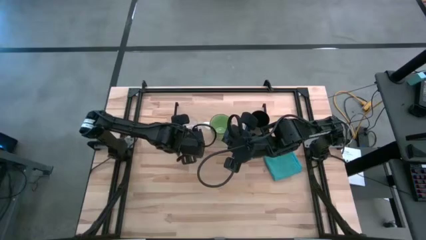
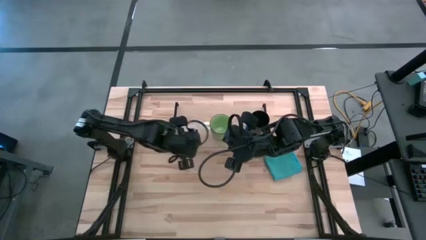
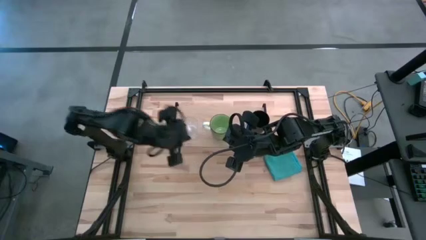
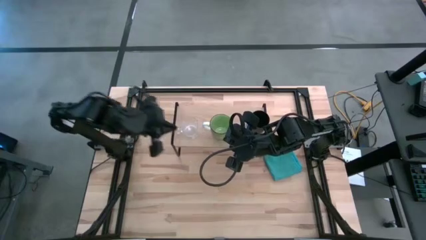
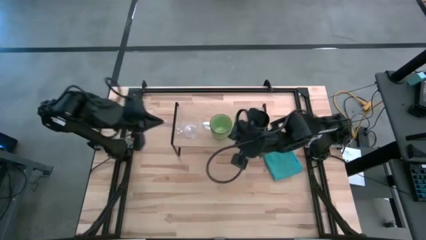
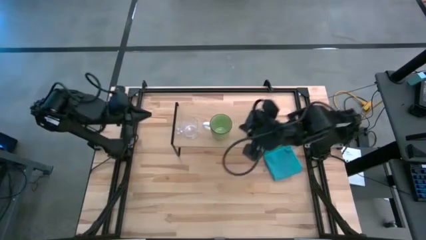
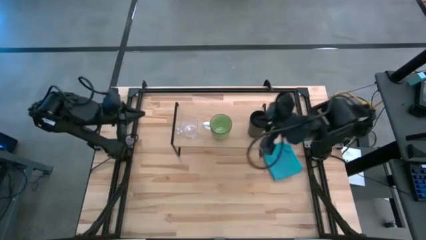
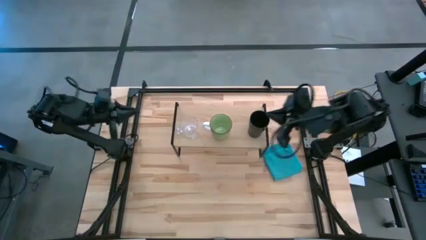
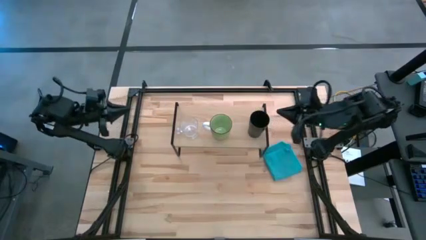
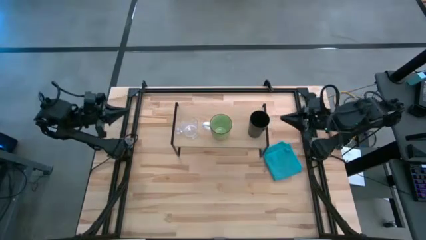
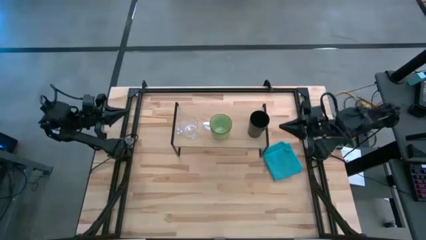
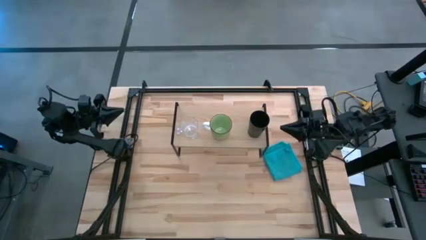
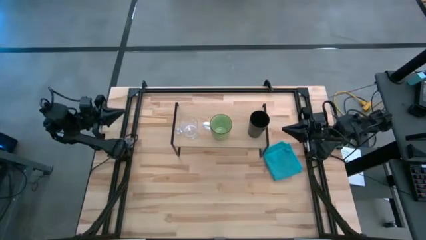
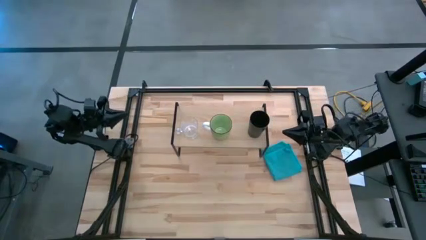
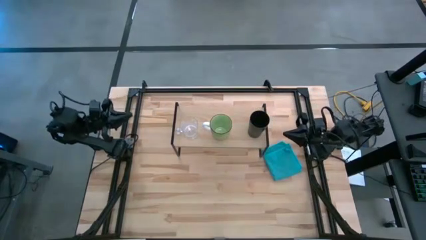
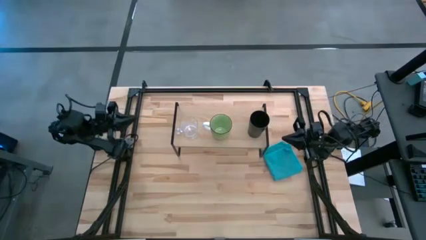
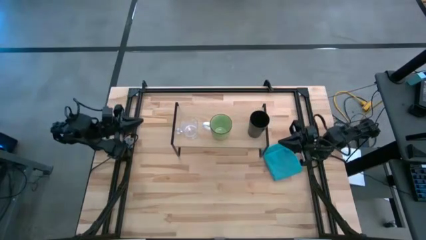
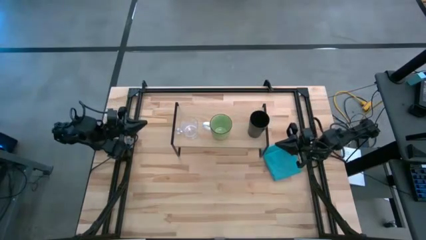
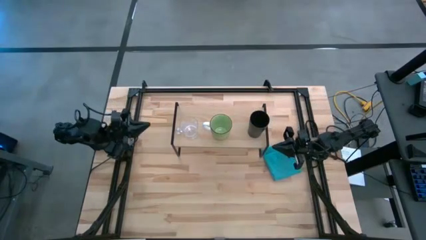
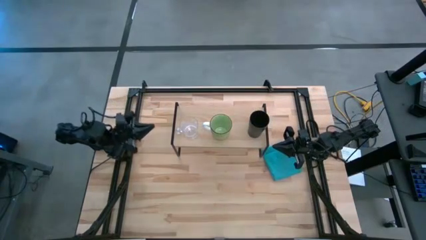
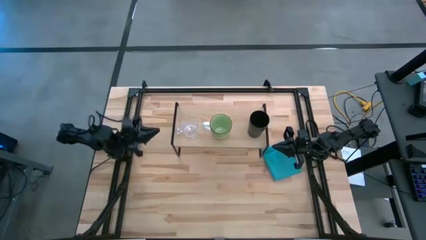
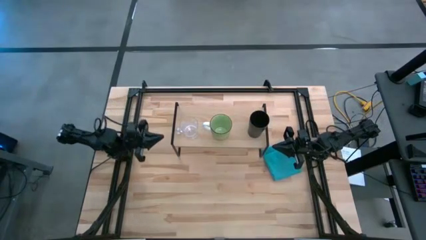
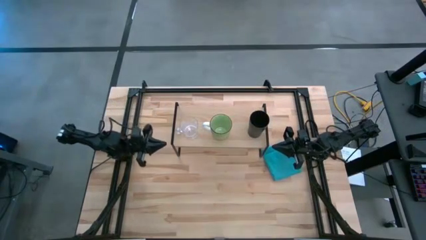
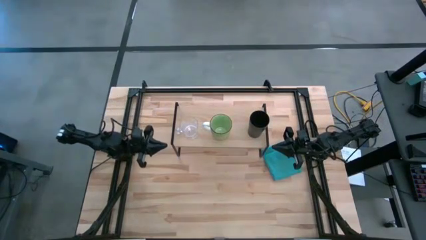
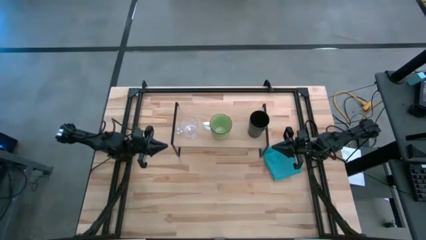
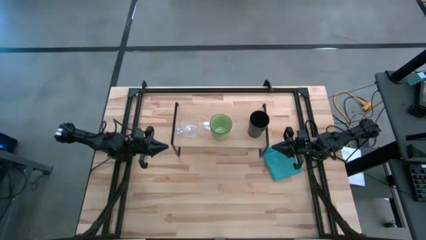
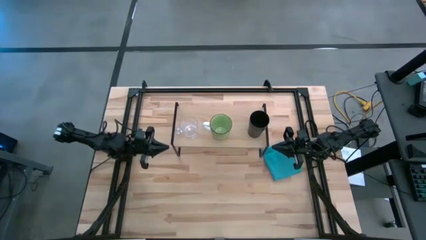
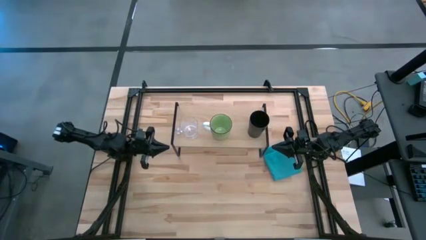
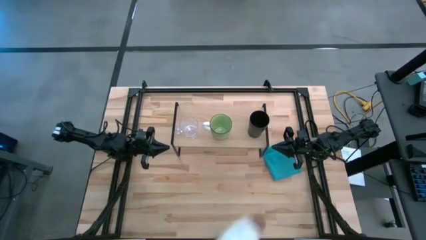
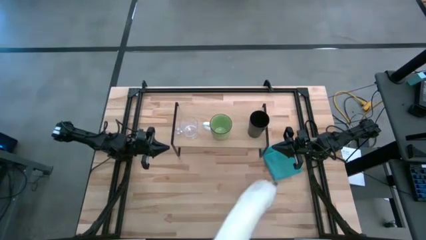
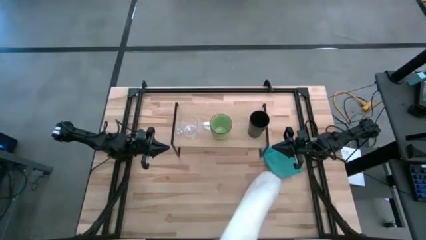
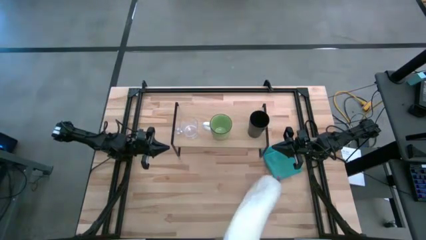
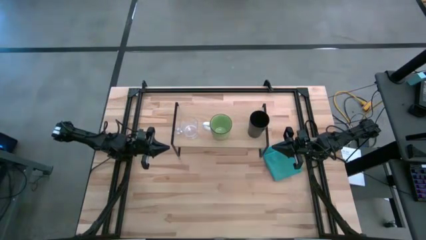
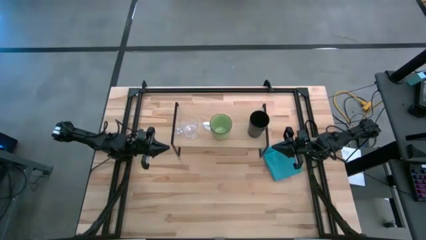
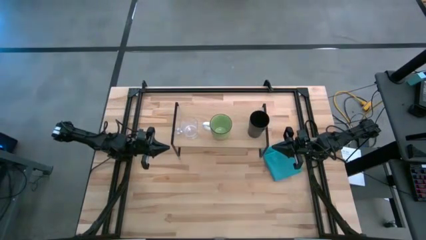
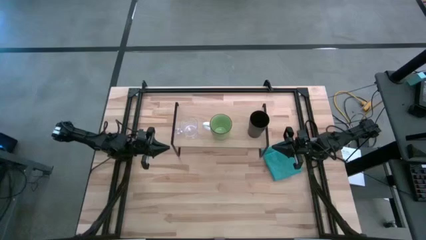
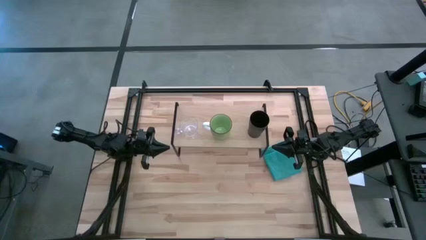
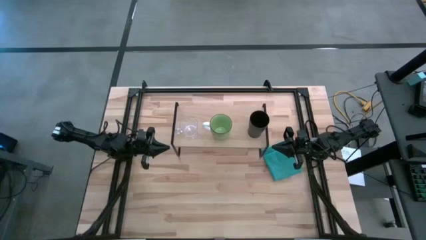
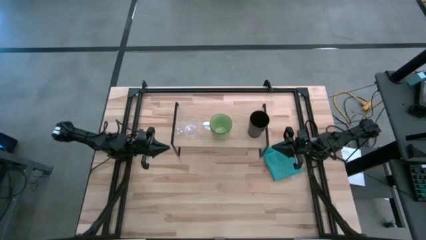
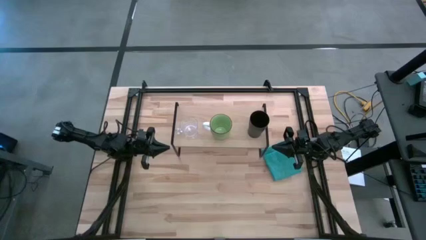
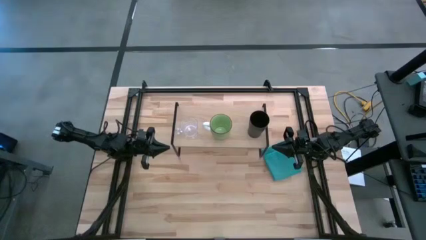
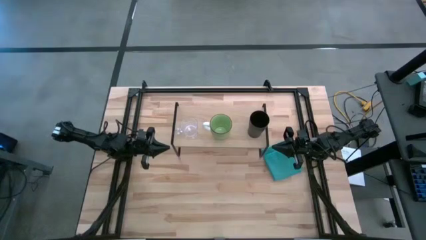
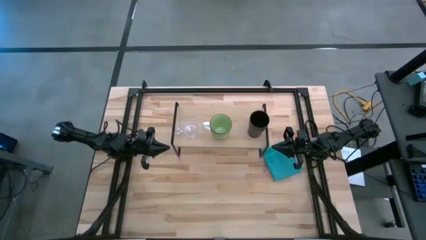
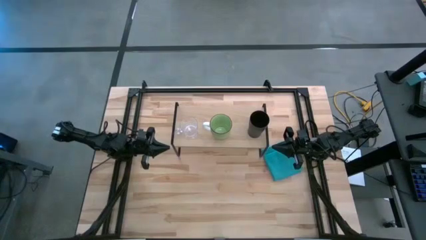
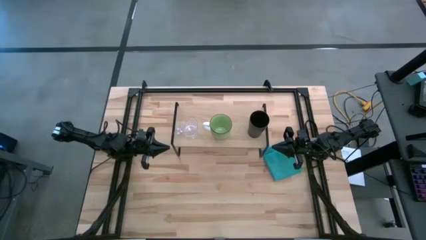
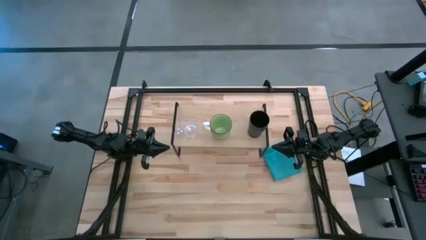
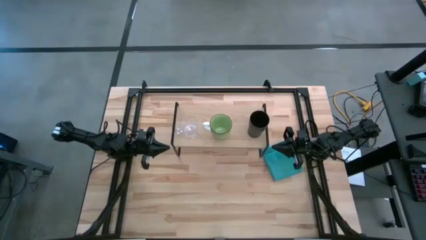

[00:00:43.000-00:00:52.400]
Task: Stack small to large cups/mugs on shelf
Return to Home Position
